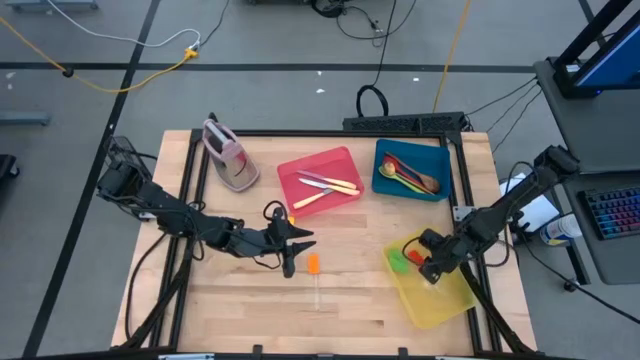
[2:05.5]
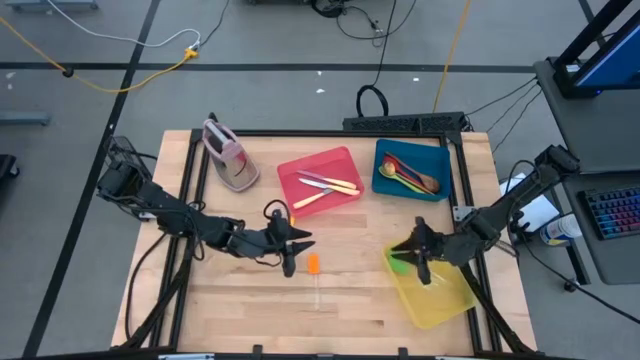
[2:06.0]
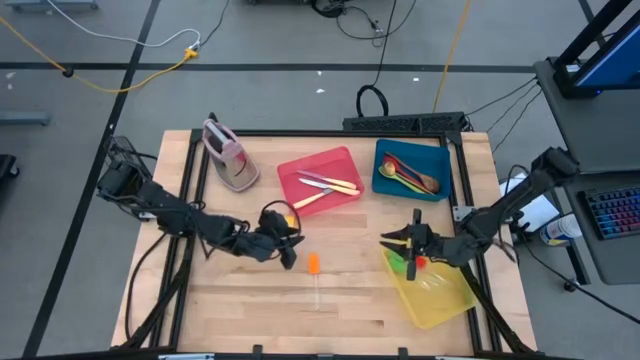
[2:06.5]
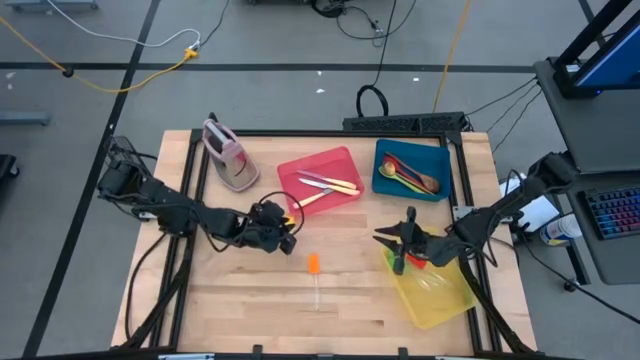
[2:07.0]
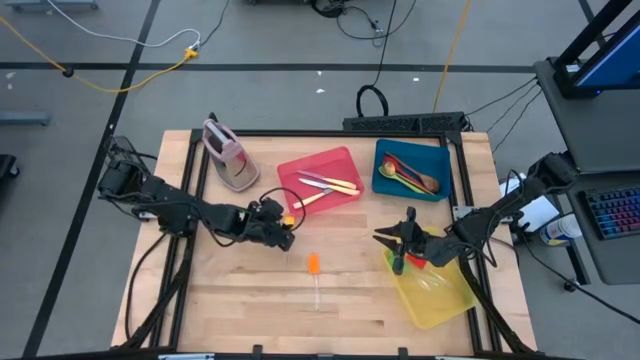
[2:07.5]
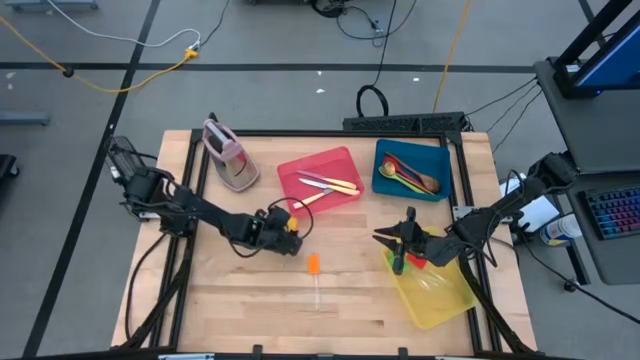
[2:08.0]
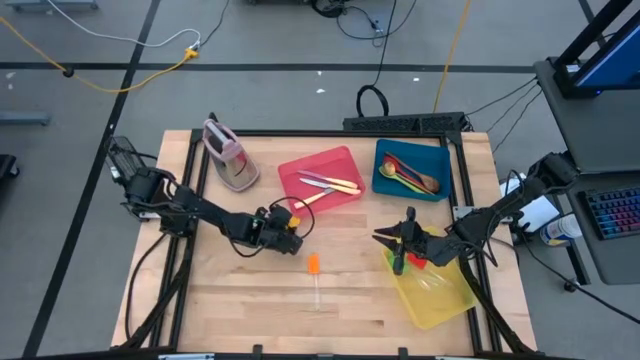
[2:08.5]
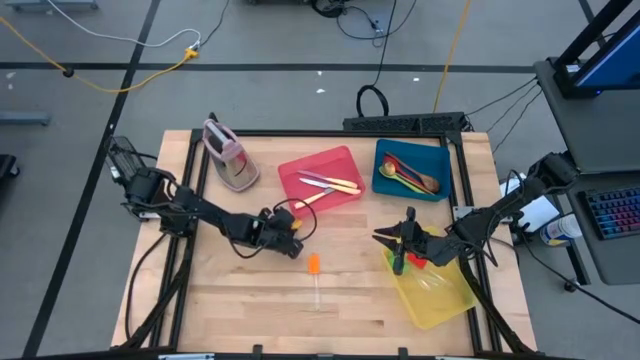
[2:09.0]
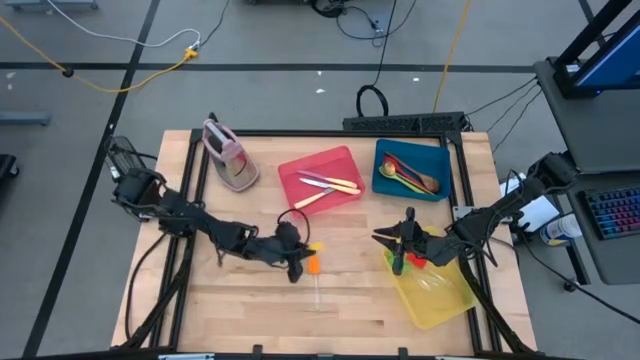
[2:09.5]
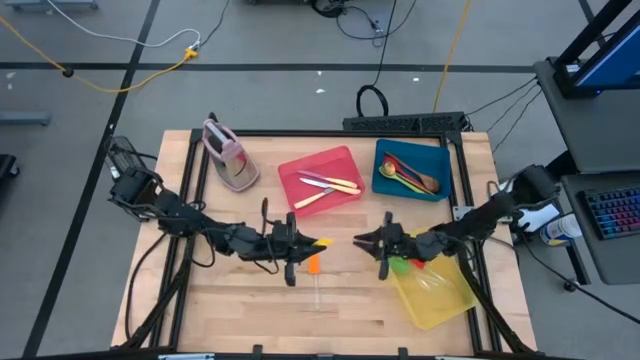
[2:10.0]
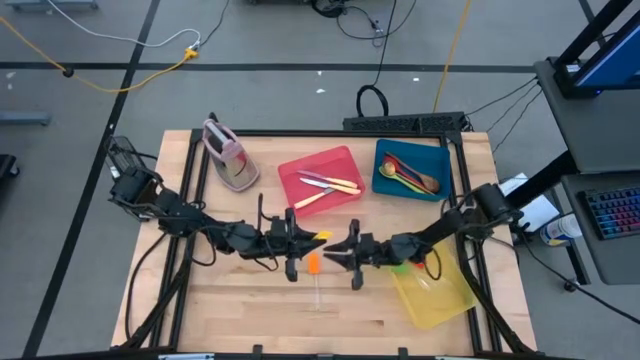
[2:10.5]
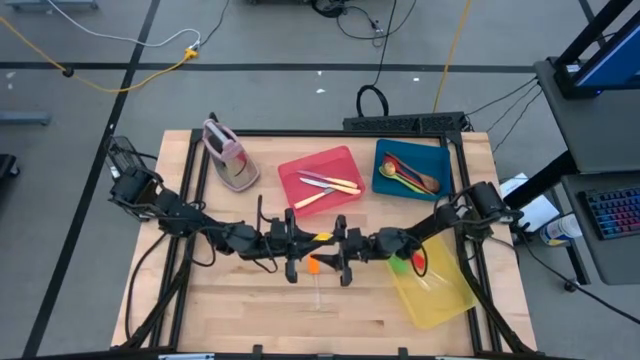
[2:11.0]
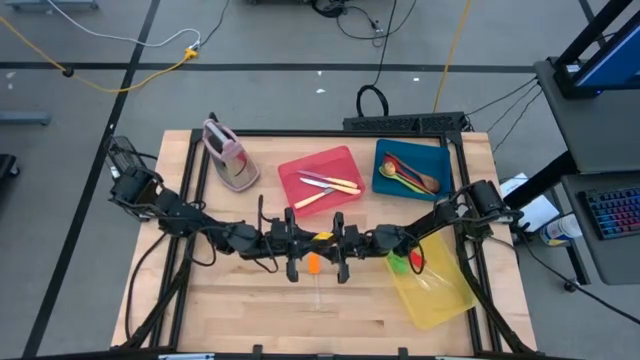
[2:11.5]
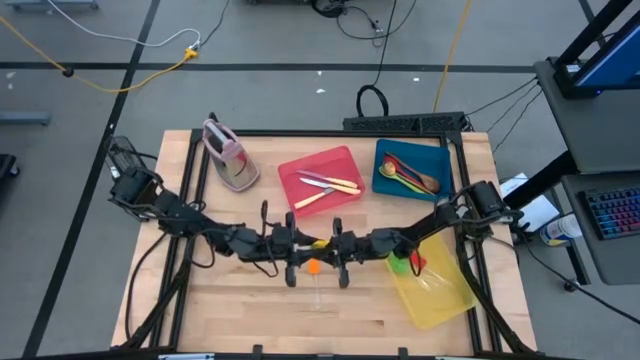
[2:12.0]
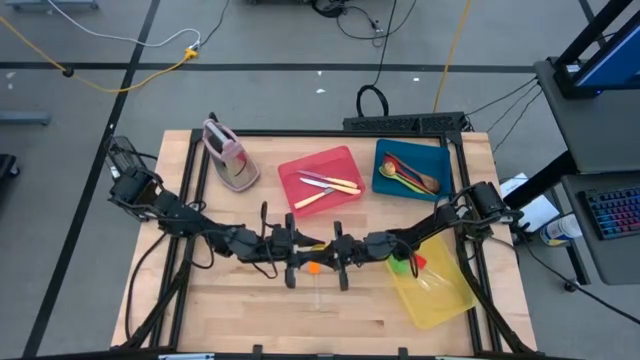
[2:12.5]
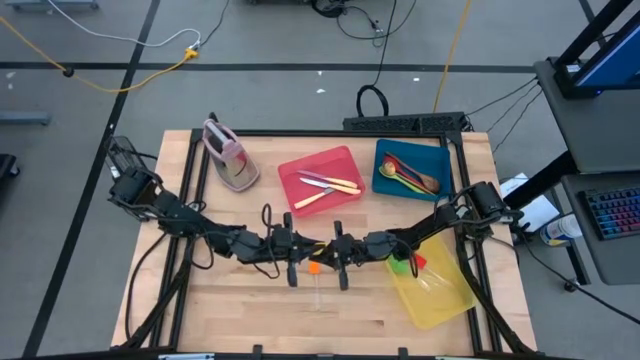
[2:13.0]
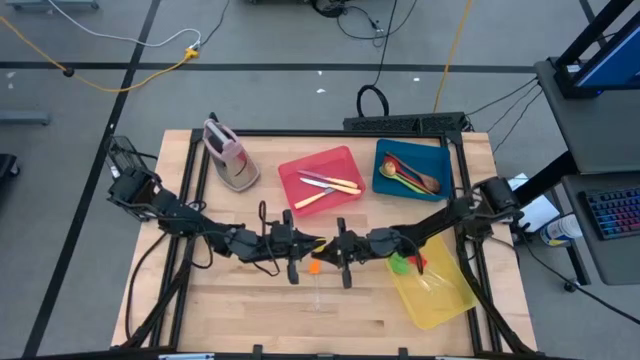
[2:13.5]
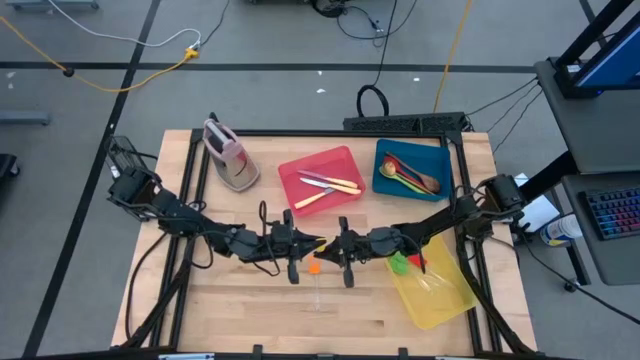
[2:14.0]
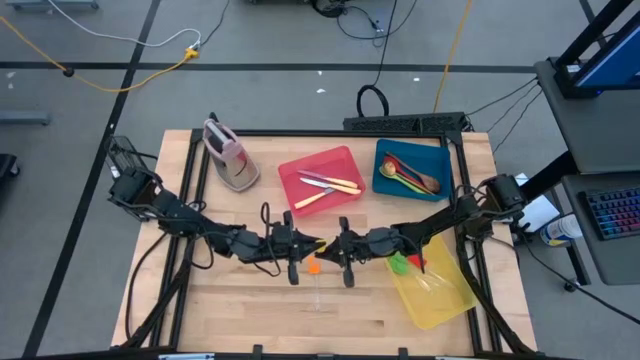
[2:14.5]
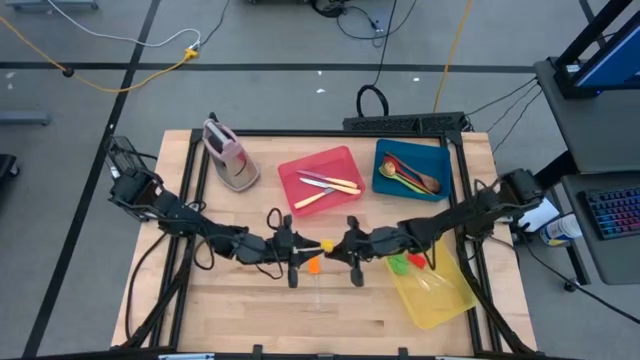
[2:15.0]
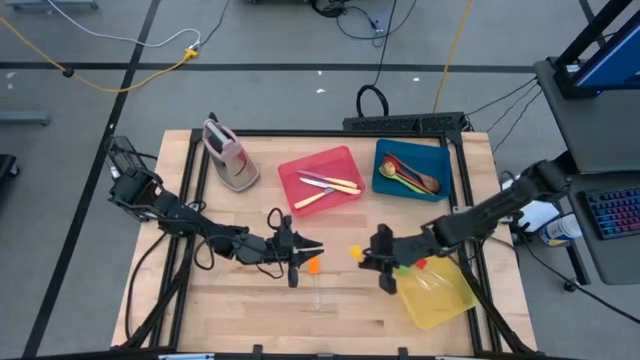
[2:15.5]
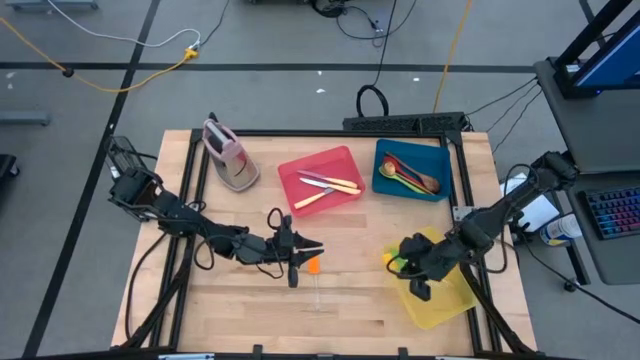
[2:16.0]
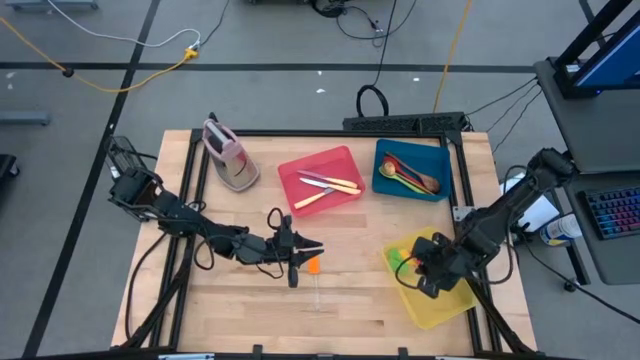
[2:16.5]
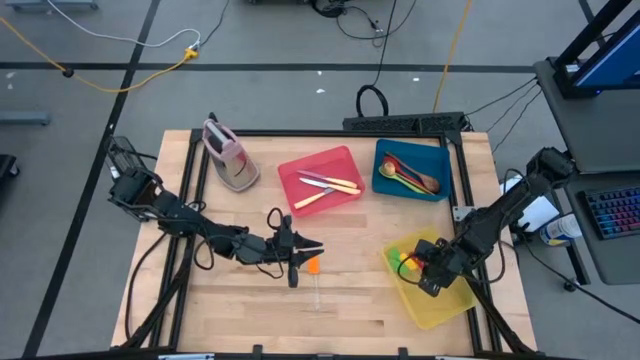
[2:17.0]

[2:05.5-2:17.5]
Task: Pick & Place Kitchen Items
Put the yellow spatula into the yellow bin

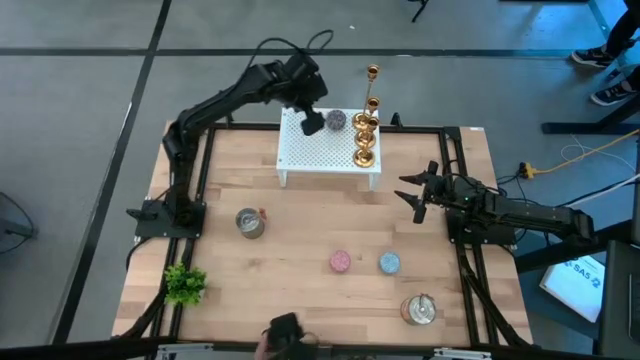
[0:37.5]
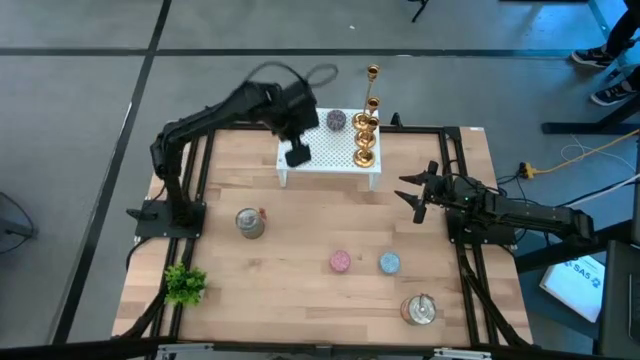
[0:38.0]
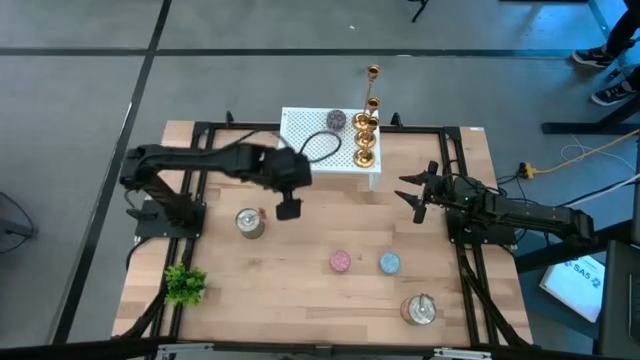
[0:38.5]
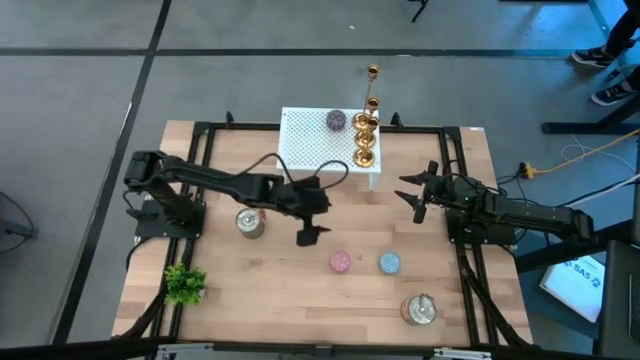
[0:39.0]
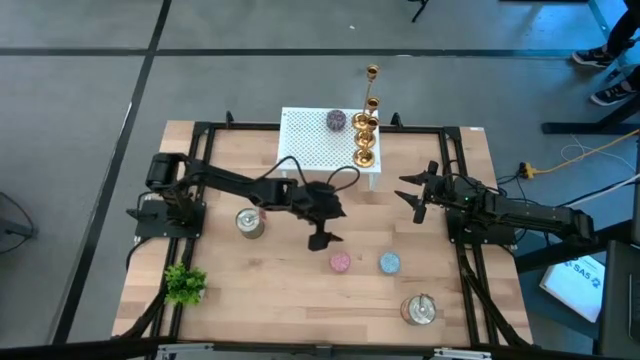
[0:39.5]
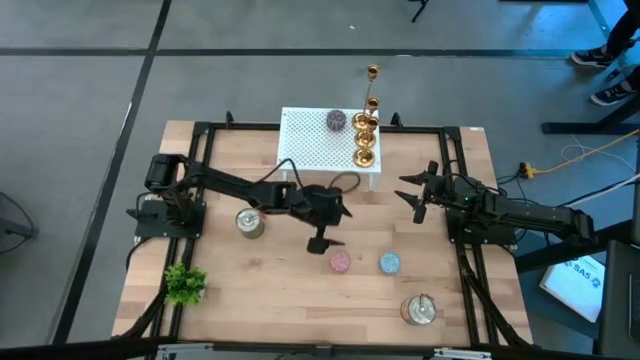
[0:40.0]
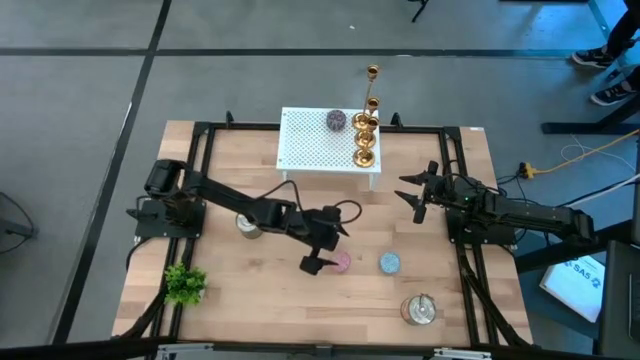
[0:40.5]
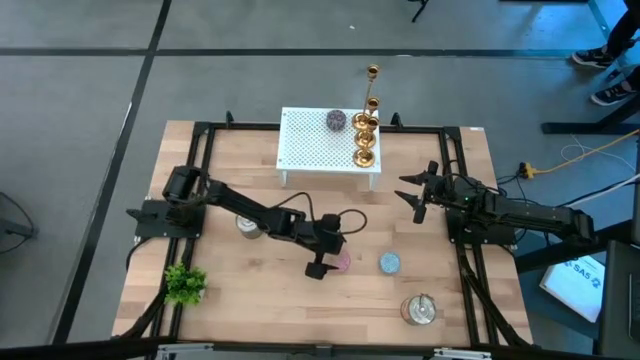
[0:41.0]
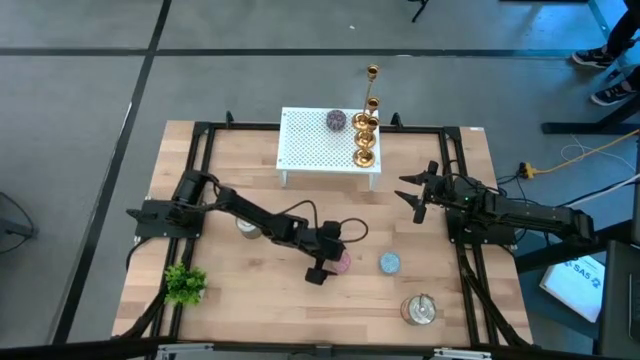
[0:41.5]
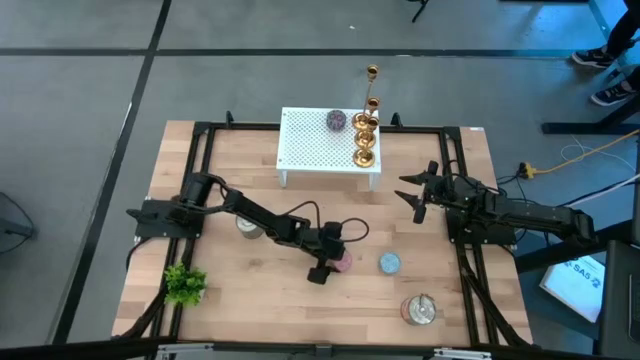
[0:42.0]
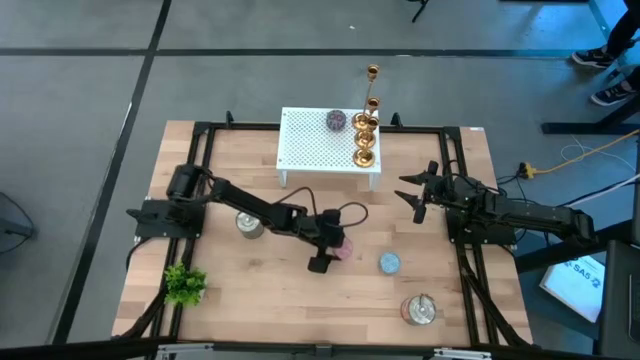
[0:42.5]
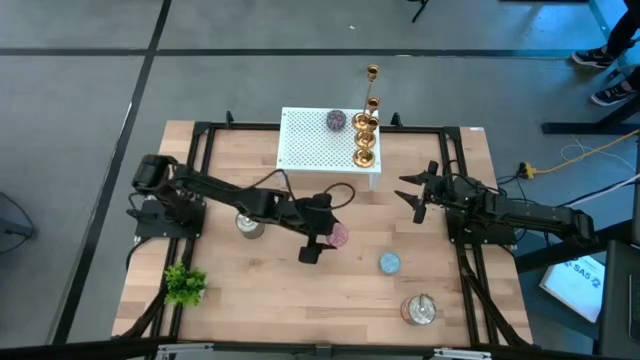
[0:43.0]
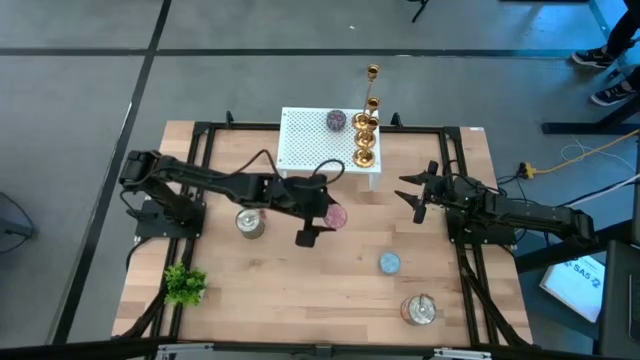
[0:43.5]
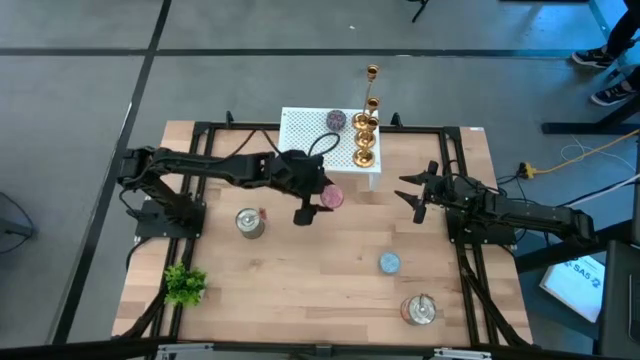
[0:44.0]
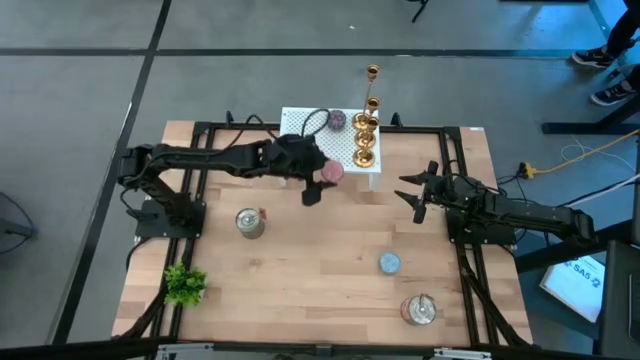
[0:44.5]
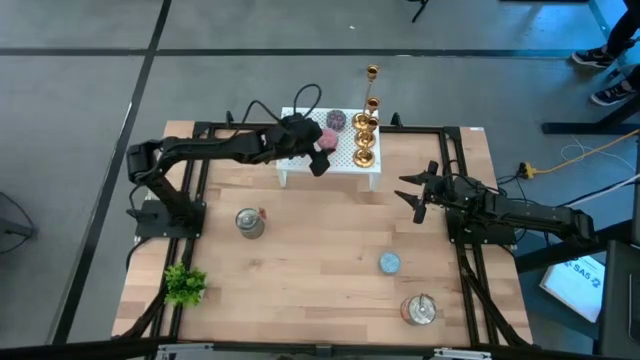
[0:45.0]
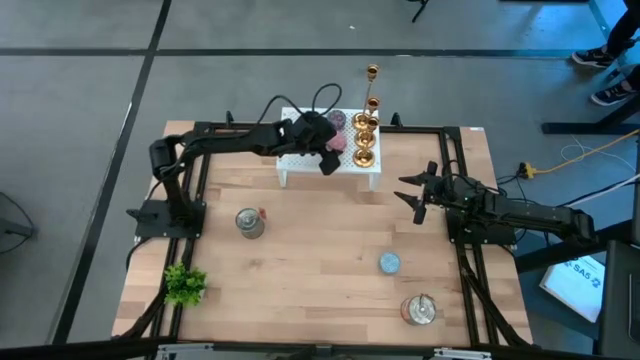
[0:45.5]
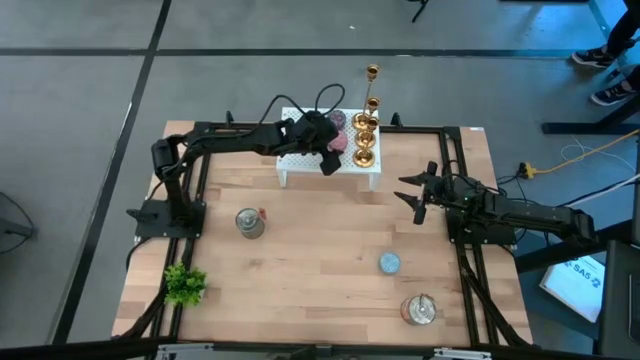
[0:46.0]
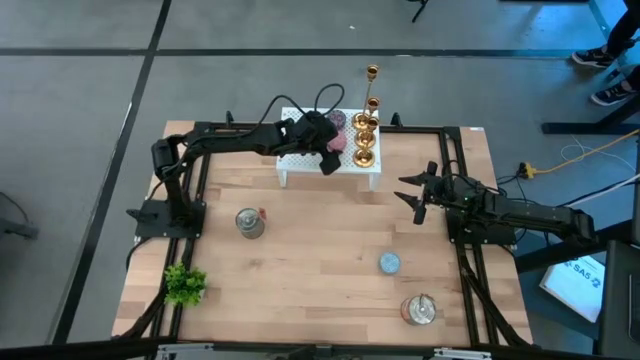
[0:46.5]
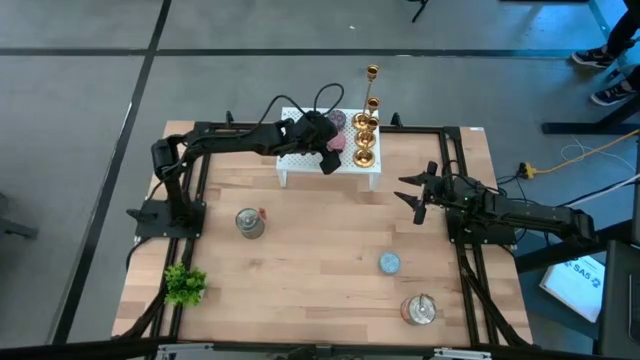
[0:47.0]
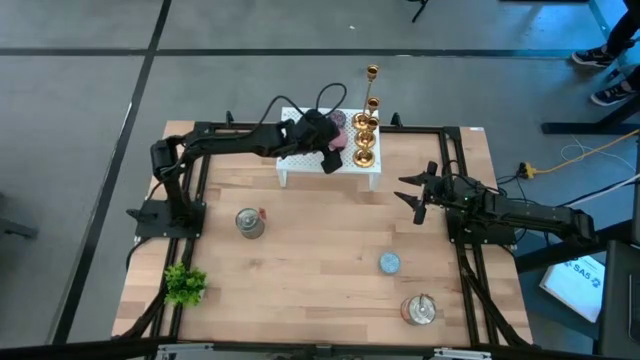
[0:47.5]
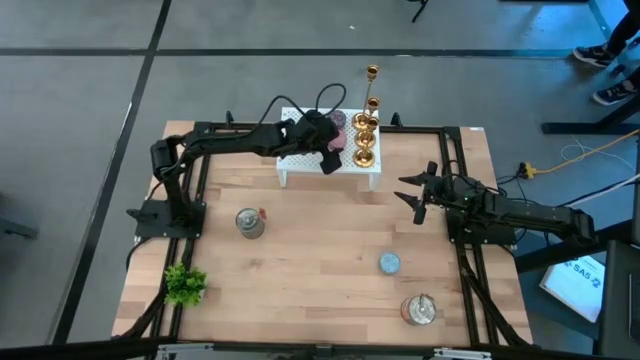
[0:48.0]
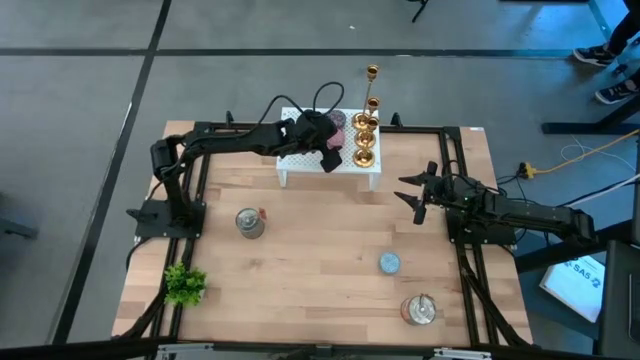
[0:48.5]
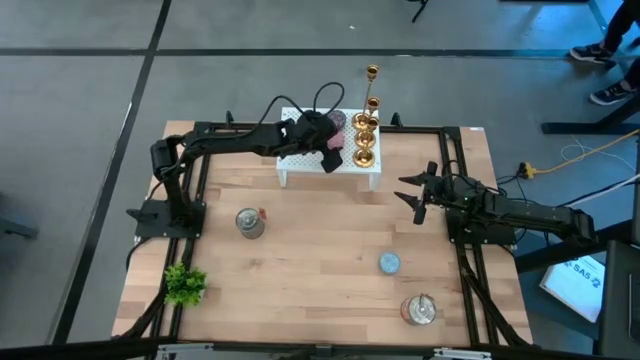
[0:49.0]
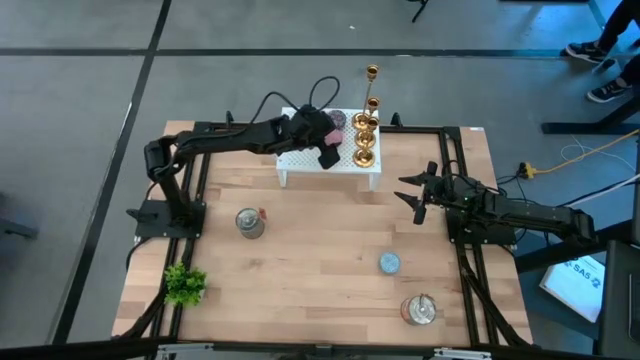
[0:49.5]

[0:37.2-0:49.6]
Task: Pick & Place candle stick holders
Put the small pink scented candle on the shelf
